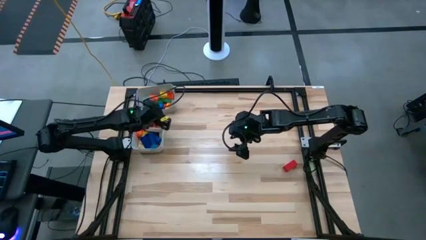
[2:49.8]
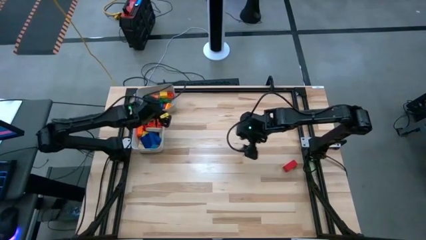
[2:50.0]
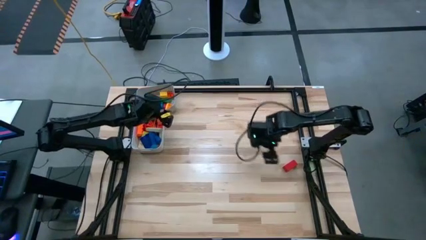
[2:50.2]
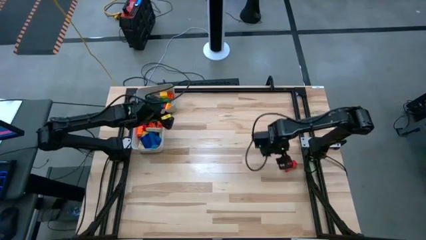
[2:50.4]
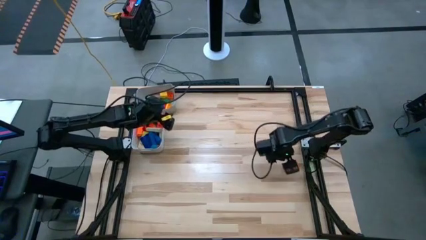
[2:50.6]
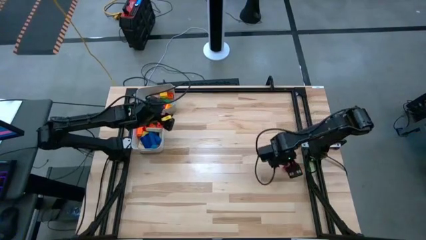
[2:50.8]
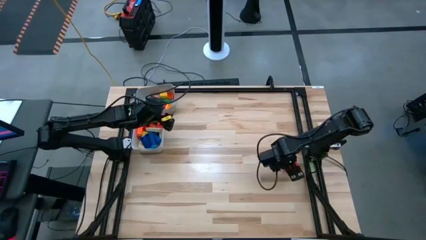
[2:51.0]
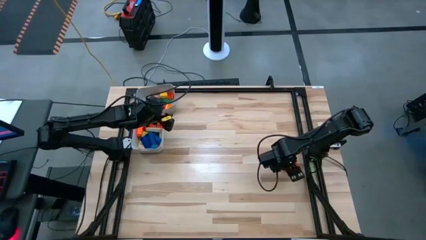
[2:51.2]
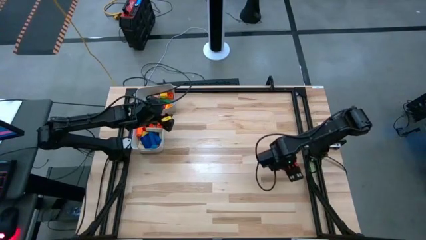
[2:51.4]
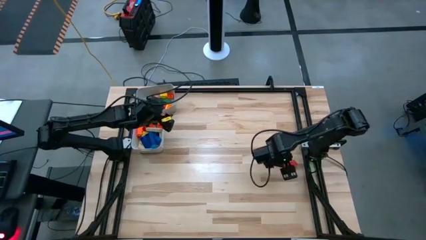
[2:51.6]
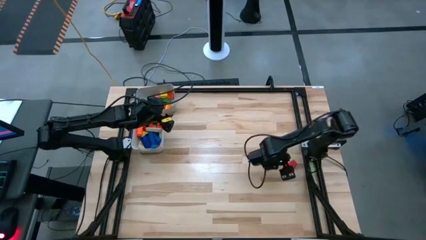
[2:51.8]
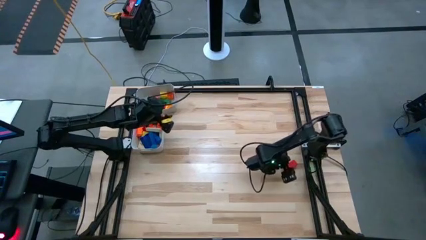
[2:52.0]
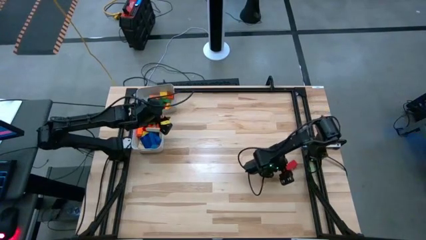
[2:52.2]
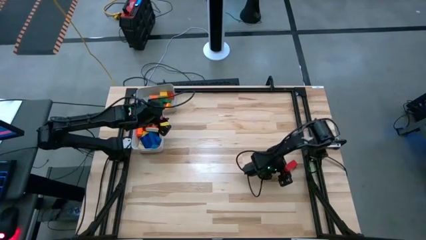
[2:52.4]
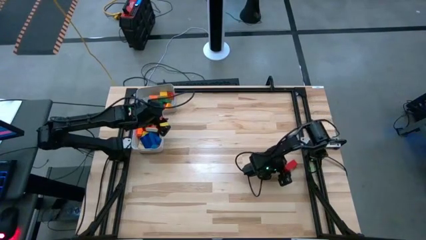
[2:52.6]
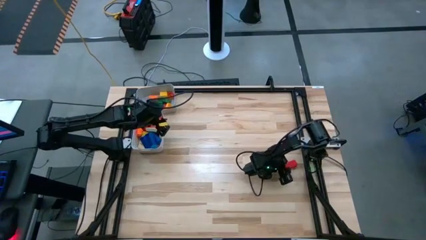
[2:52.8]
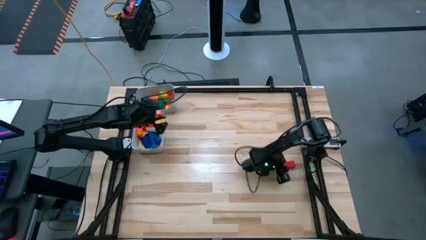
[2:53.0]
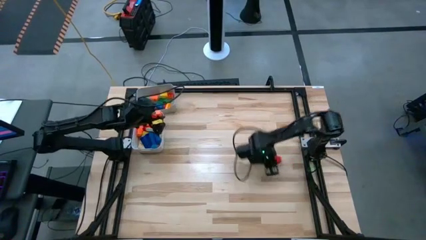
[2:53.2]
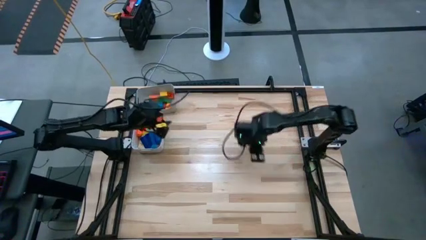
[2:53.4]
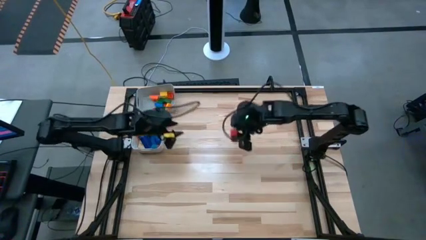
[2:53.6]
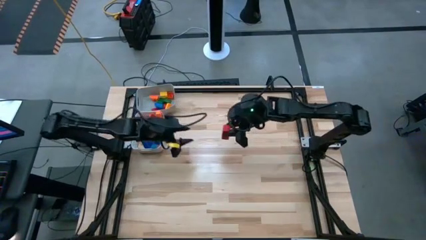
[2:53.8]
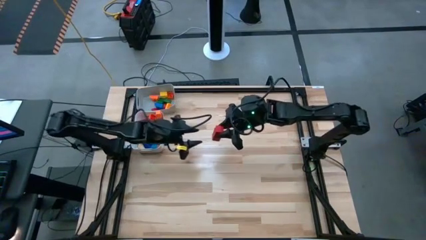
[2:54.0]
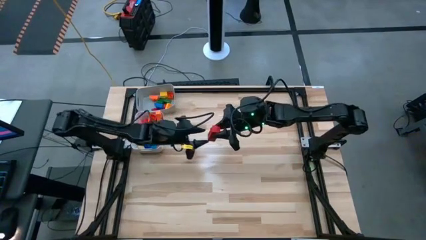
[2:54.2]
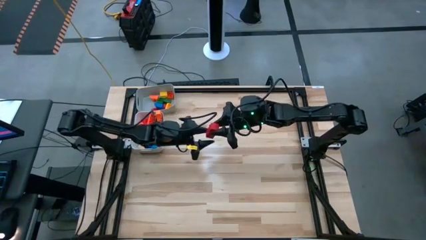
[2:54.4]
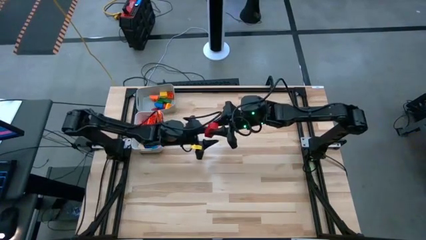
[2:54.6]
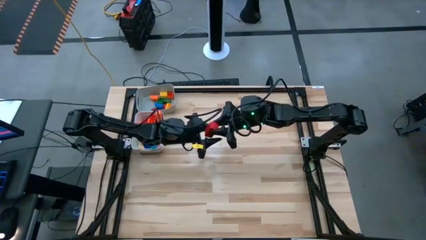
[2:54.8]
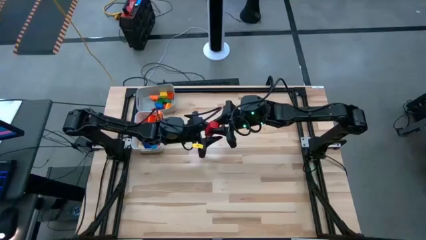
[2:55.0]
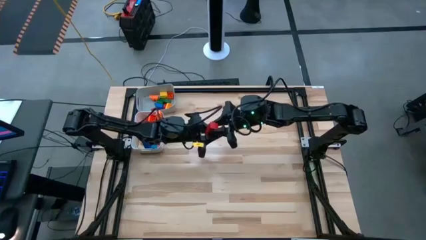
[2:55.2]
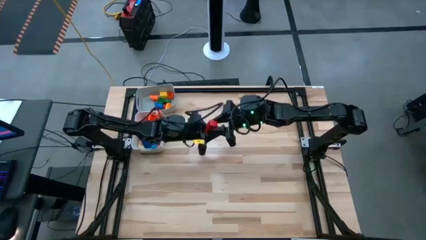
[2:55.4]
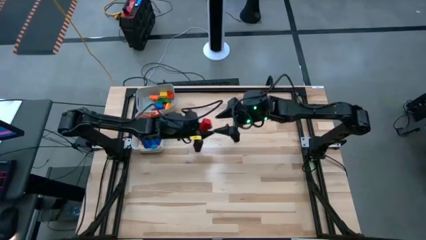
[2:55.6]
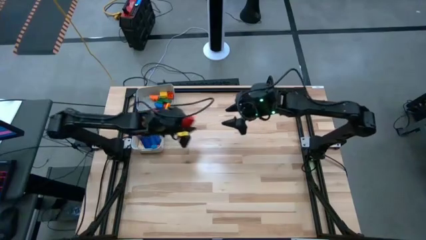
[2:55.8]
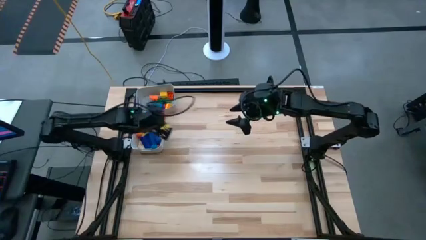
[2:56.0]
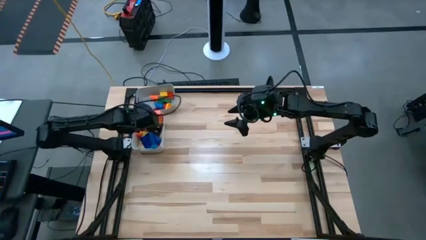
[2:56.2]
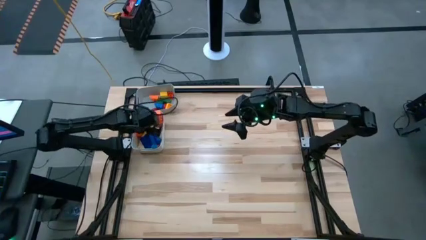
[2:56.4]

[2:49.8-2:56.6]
Task: Sort blocks by size
Put the large red wooden block into the white bin

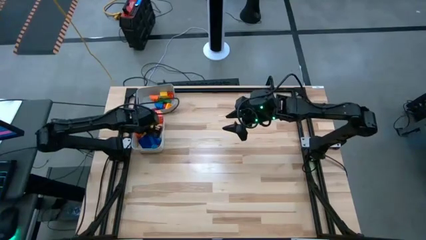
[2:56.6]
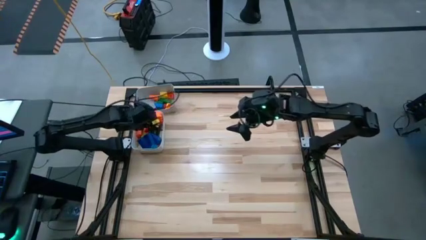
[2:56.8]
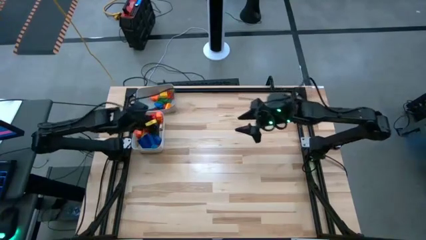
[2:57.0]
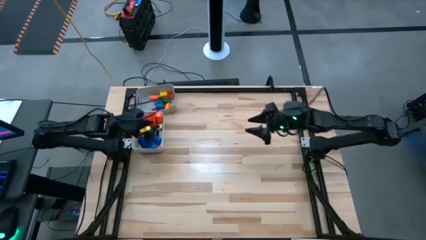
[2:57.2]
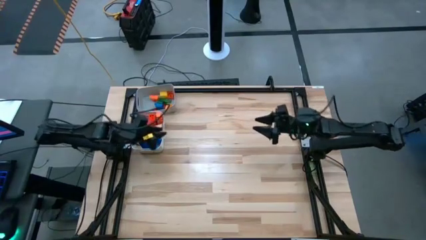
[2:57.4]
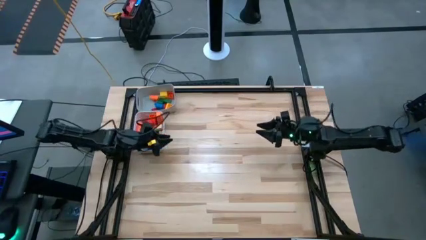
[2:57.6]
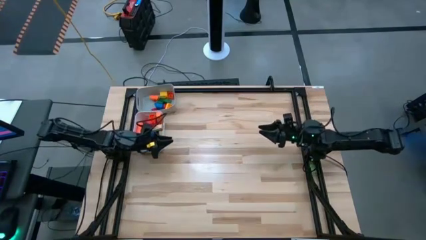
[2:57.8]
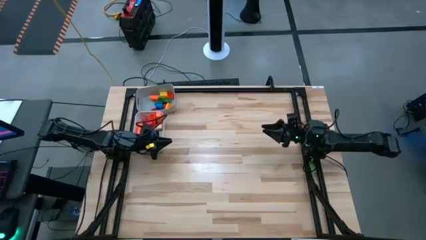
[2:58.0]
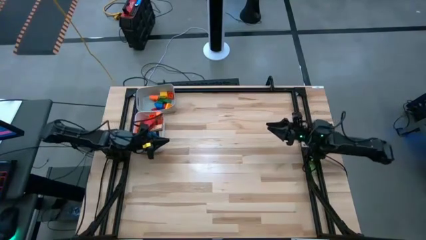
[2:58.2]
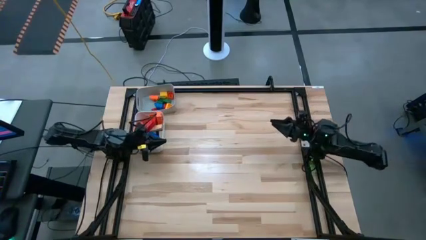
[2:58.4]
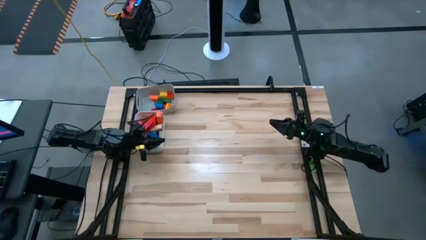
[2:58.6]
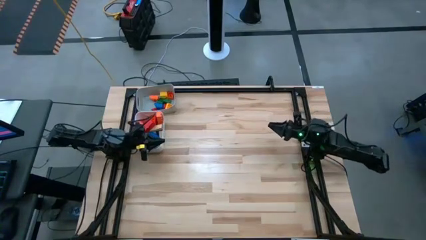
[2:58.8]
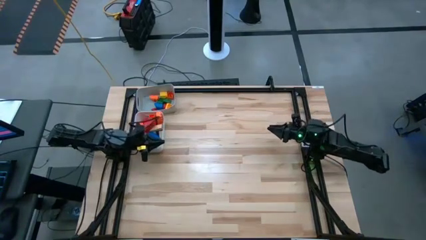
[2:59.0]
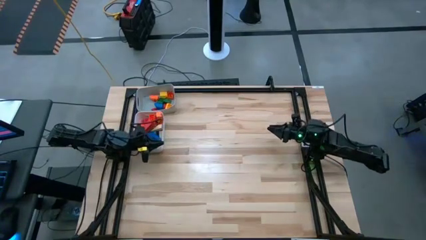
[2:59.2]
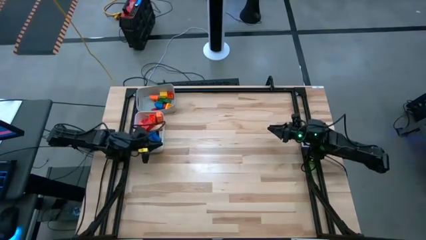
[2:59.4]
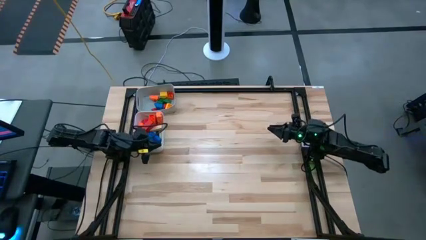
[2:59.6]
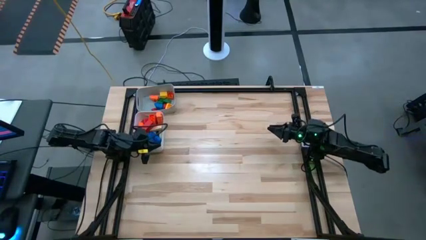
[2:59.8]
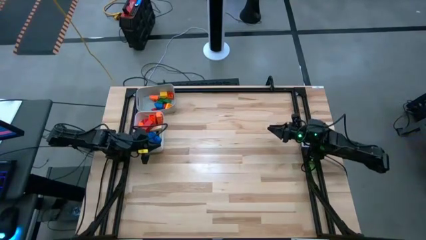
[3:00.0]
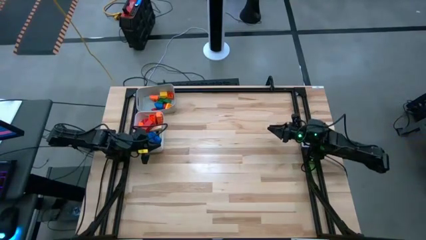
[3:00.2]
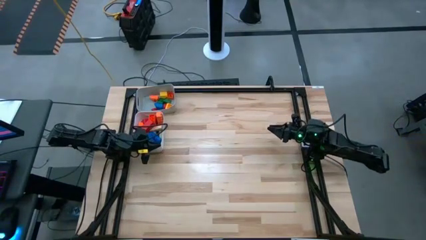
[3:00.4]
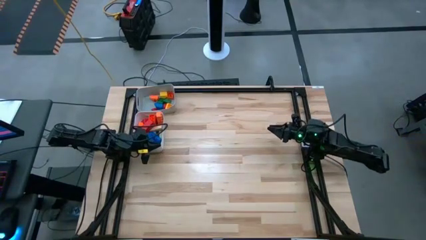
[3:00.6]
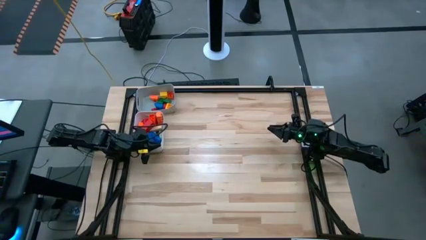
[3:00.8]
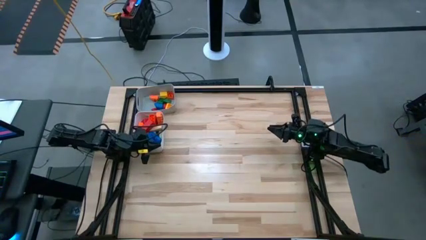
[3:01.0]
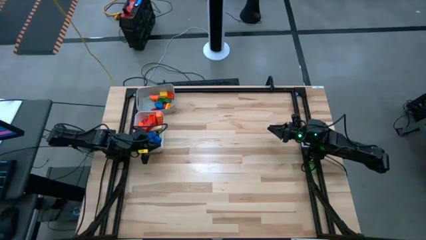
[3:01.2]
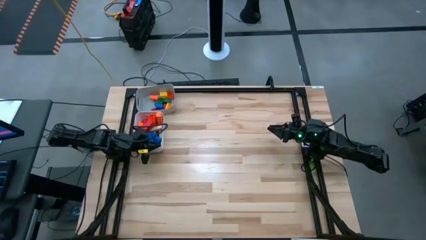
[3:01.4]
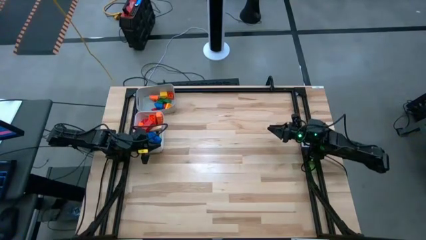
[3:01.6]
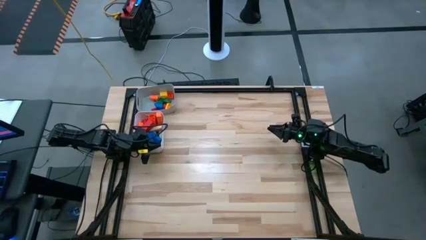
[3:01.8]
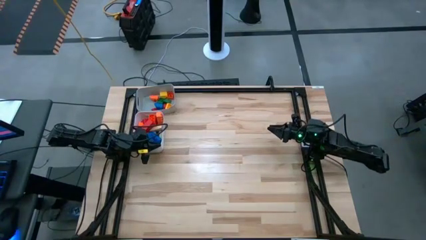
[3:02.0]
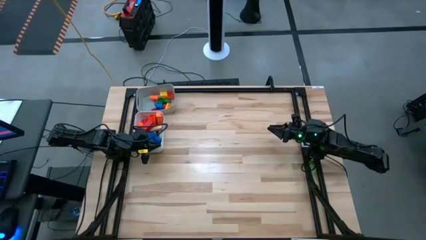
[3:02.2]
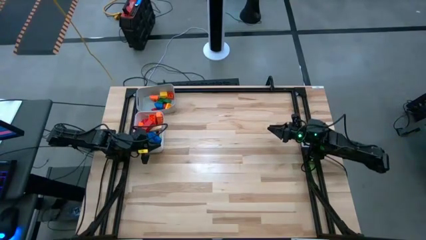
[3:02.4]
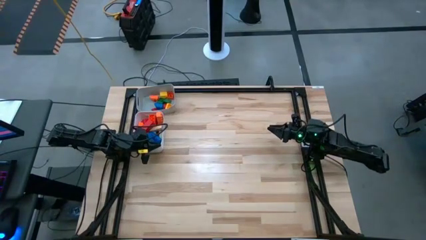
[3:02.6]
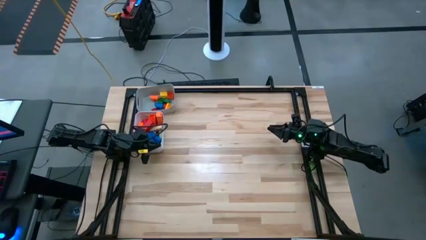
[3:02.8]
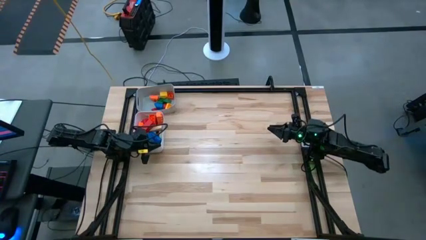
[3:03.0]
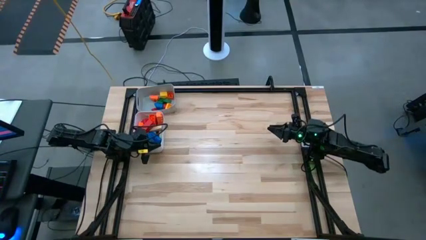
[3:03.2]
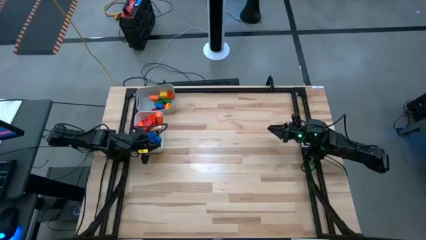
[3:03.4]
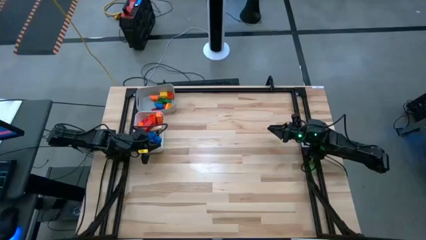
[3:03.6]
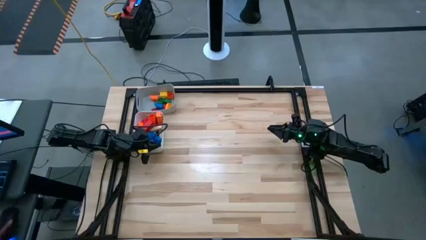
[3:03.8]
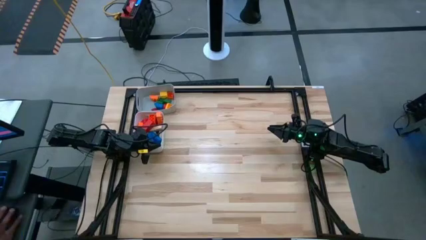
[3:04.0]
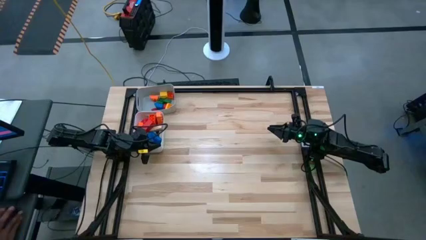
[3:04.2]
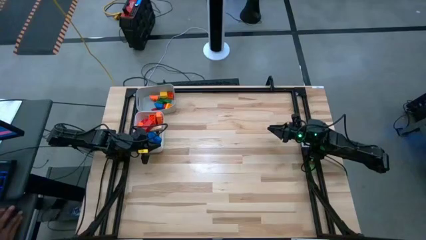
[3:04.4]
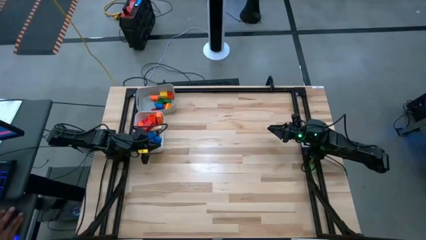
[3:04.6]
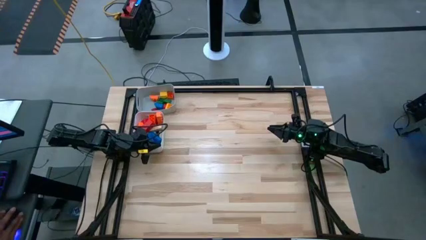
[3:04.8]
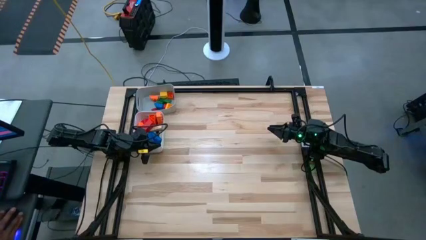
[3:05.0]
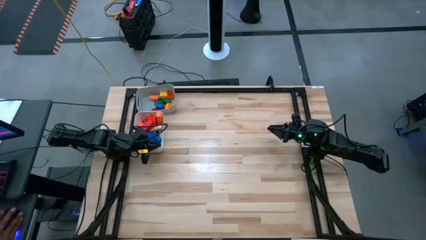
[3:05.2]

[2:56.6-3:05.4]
Return to Home Position
